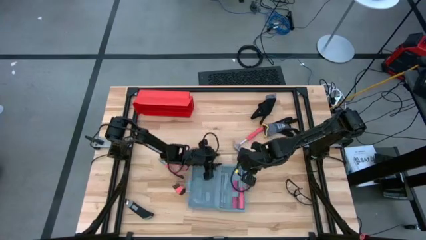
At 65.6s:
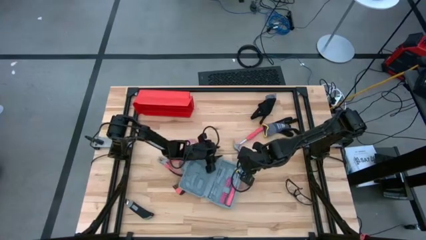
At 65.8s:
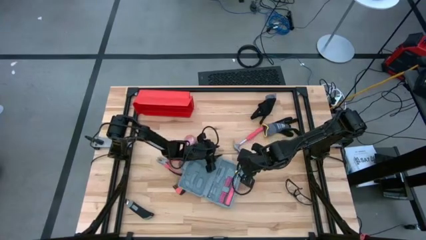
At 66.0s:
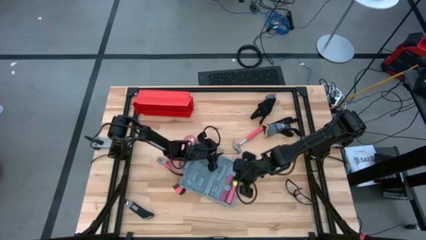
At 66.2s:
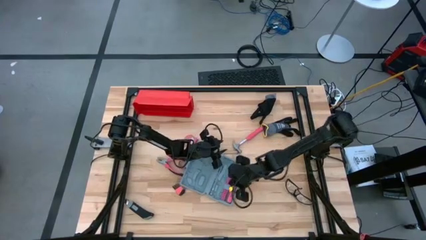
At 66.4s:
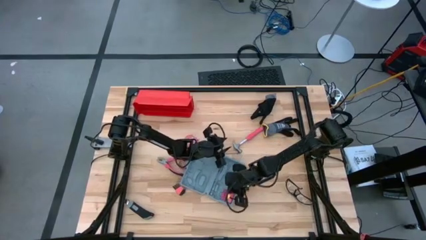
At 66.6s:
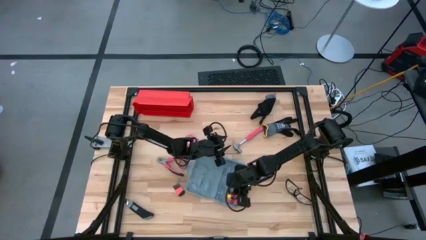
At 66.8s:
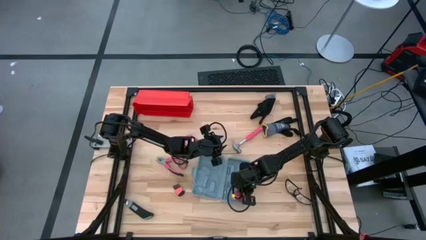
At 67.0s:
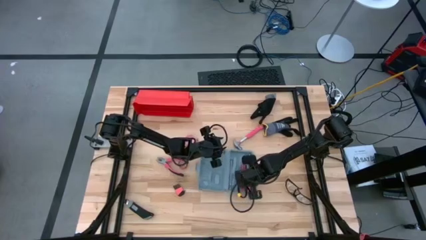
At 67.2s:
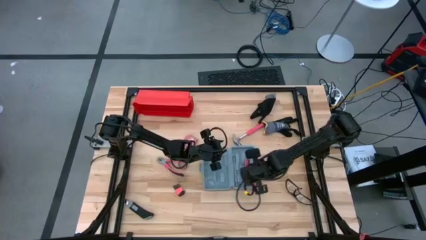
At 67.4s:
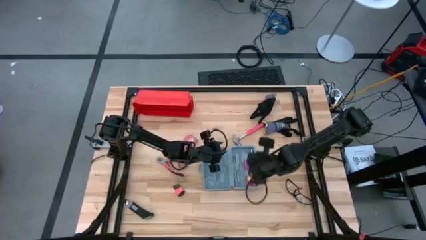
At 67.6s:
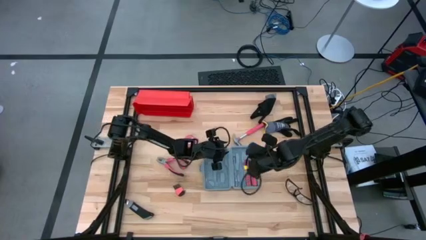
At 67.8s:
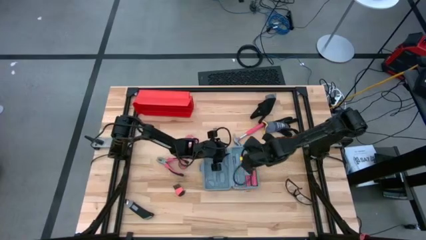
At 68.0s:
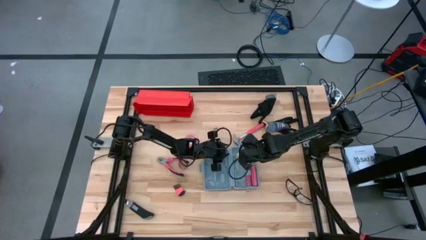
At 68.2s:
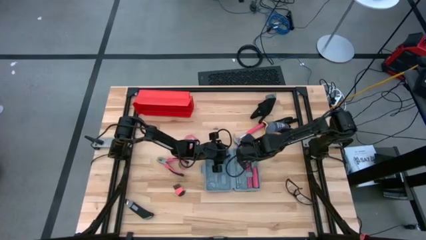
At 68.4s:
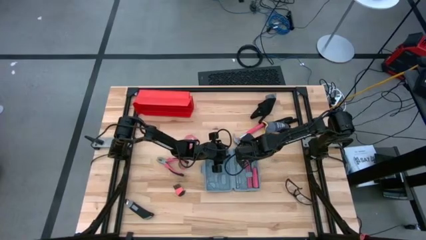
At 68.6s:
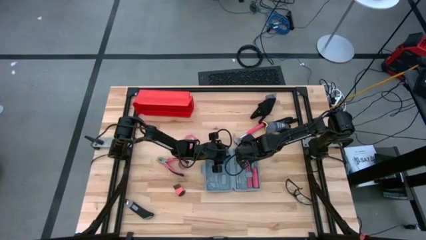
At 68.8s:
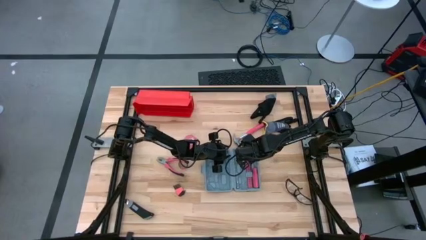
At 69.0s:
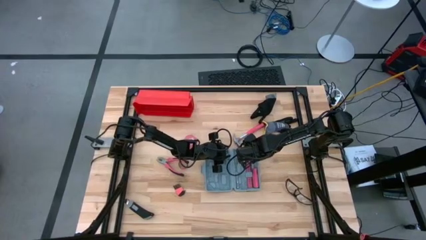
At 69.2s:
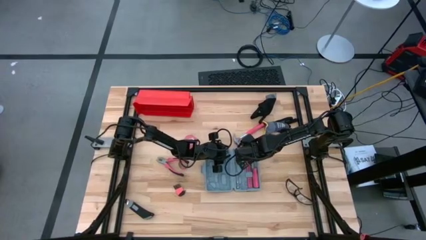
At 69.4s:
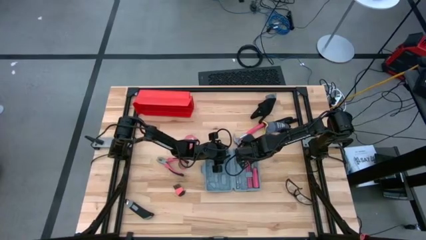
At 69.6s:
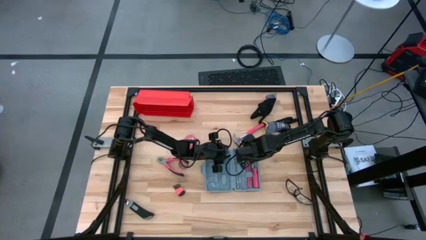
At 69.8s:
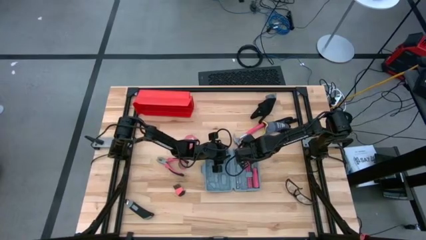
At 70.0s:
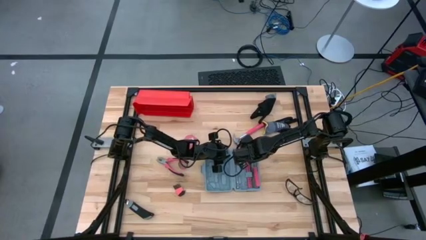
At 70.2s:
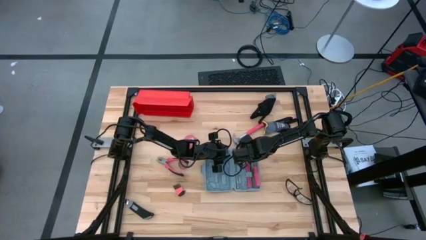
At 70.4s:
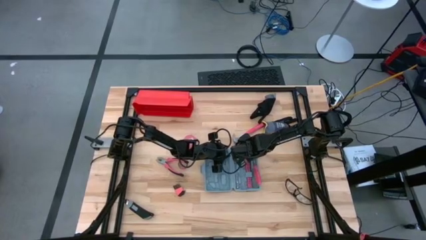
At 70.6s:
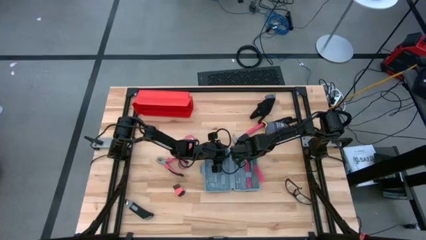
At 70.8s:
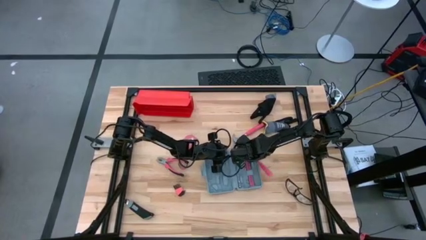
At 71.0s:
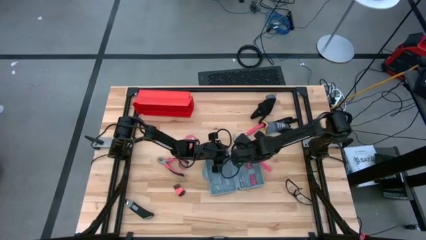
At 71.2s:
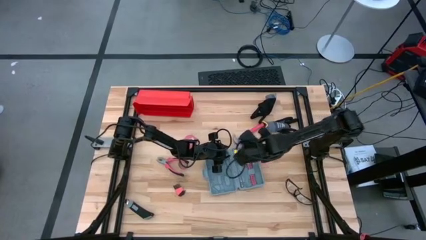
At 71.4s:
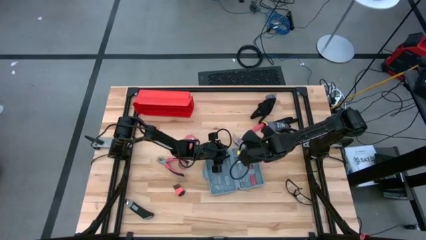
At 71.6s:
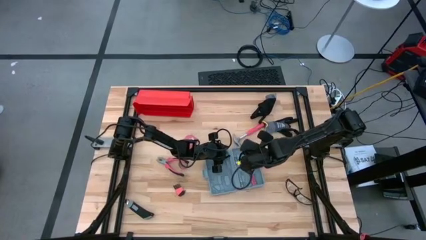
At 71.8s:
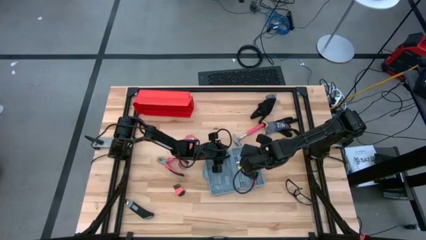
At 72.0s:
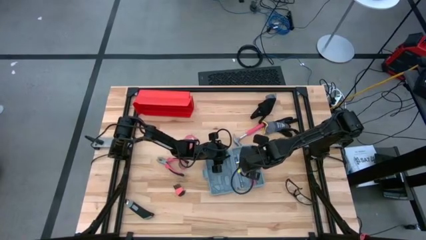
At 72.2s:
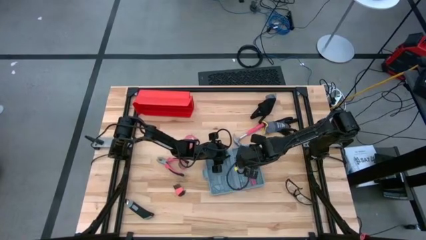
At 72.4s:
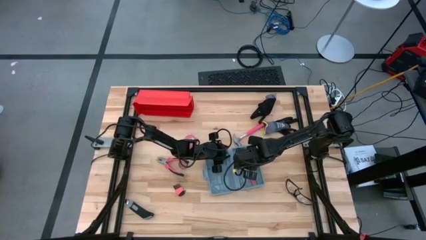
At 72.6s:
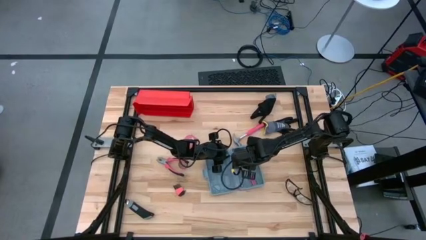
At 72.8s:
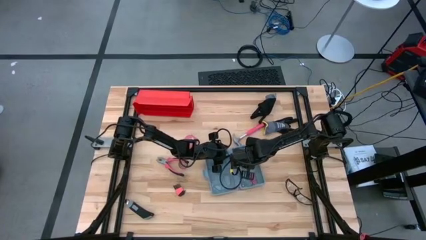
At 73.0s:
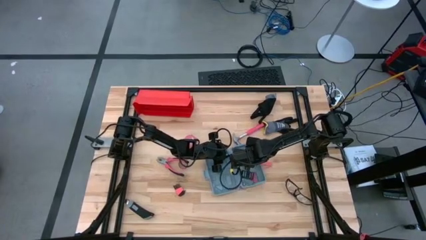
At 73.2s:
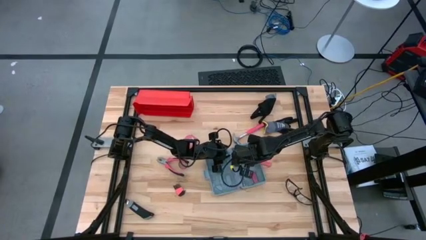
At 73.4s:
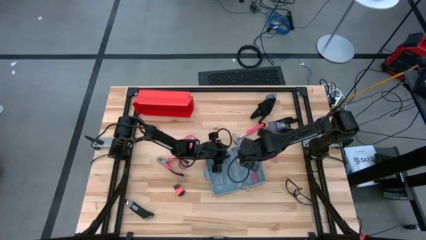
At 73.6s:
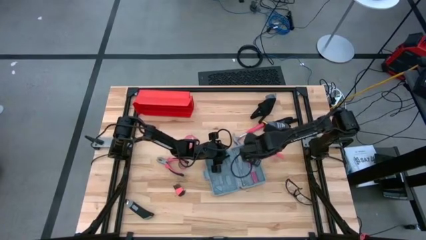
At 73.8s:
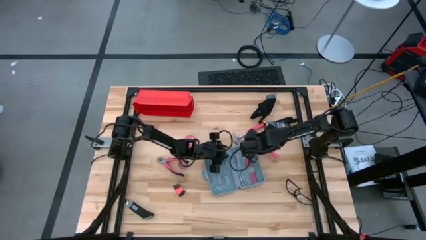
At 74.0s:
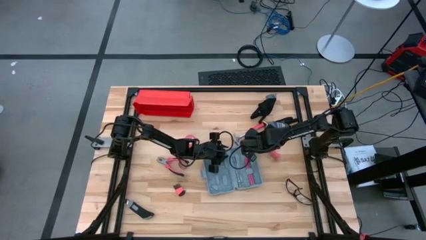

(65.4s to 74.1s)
Task: prefit tool cases
Remove the orange nut driver from the gray pre-fit tool case

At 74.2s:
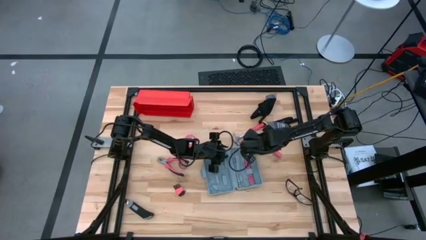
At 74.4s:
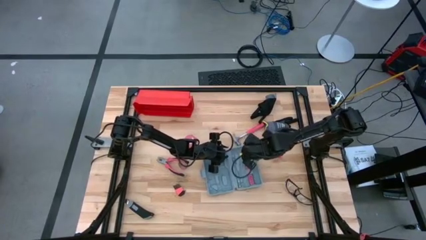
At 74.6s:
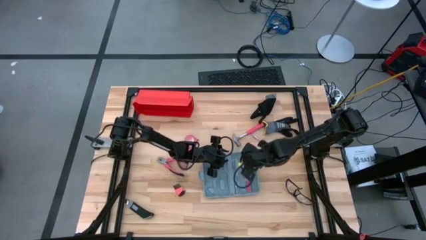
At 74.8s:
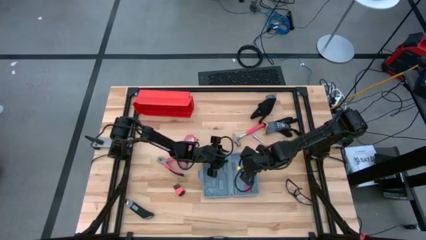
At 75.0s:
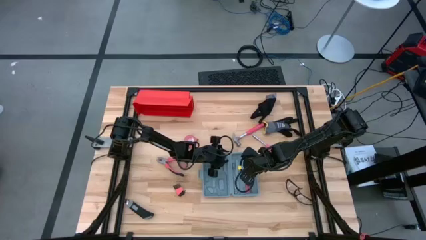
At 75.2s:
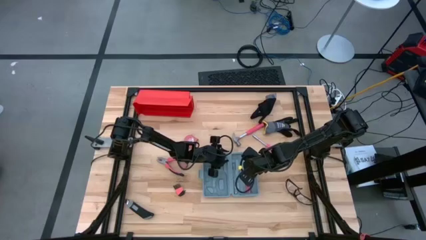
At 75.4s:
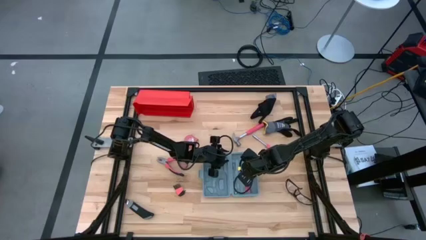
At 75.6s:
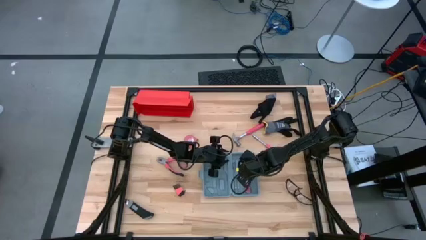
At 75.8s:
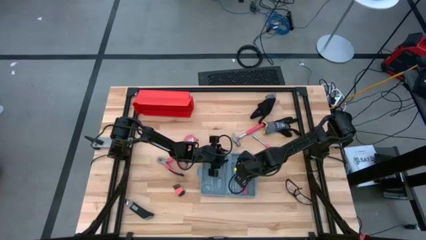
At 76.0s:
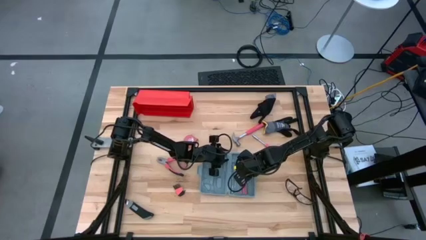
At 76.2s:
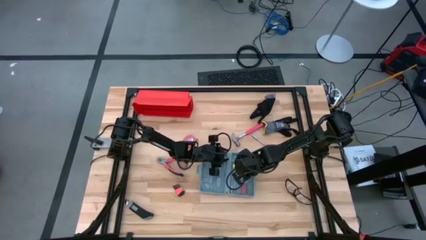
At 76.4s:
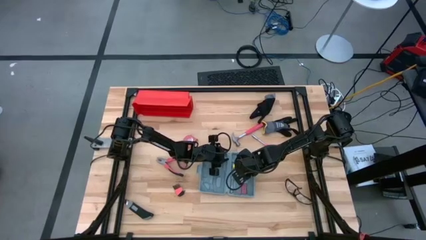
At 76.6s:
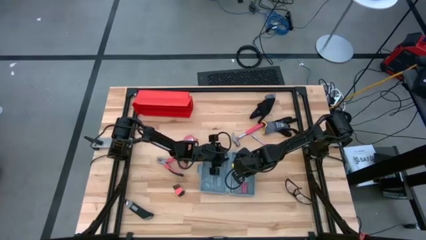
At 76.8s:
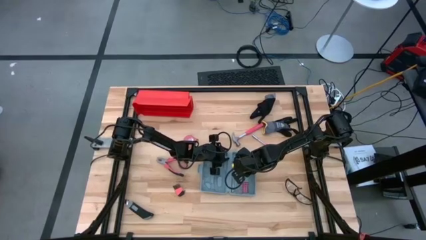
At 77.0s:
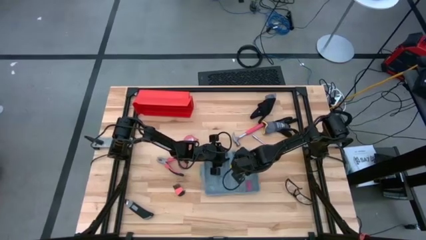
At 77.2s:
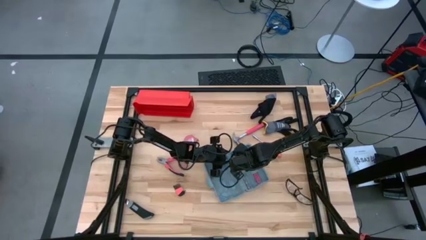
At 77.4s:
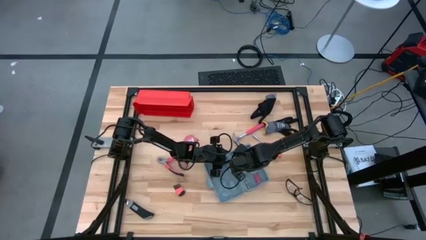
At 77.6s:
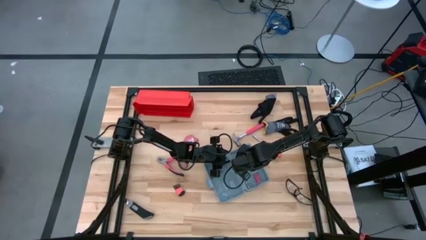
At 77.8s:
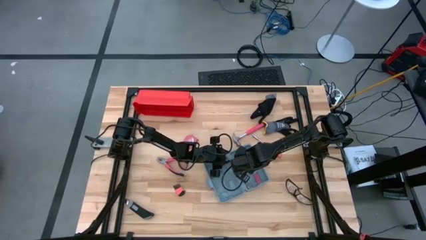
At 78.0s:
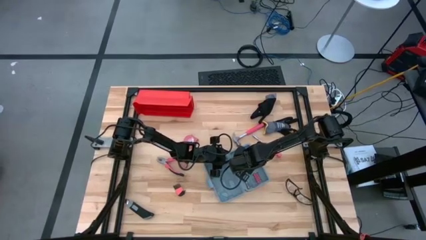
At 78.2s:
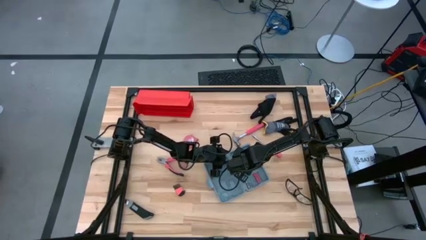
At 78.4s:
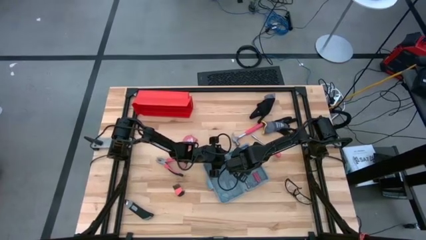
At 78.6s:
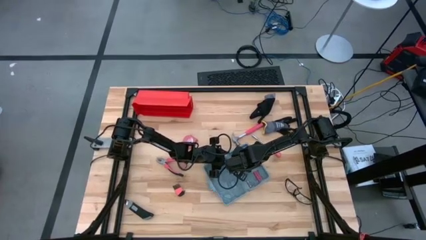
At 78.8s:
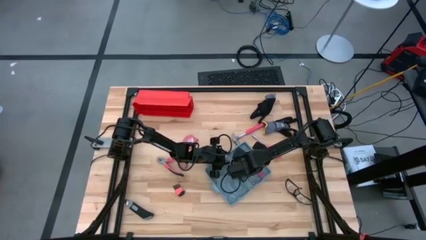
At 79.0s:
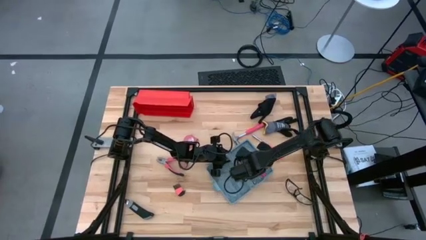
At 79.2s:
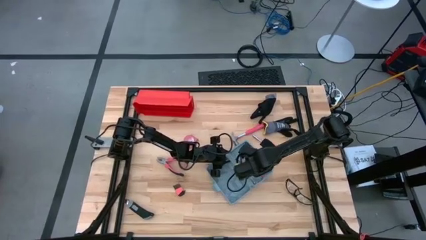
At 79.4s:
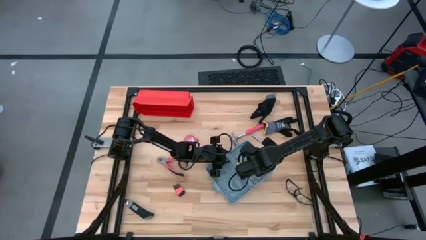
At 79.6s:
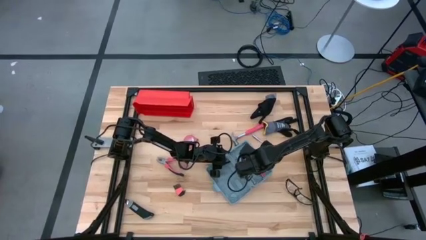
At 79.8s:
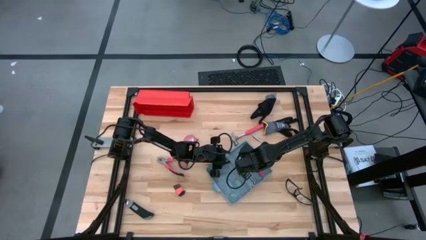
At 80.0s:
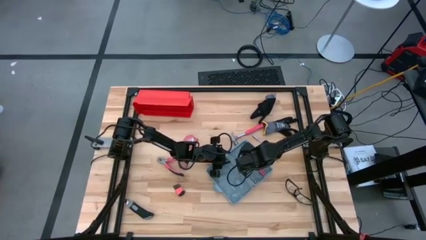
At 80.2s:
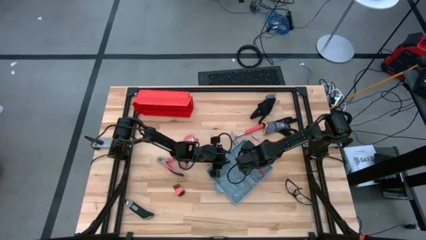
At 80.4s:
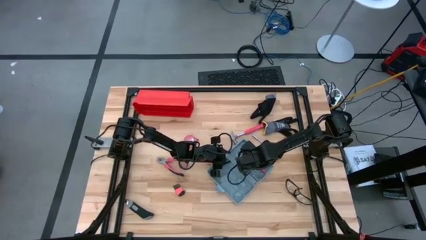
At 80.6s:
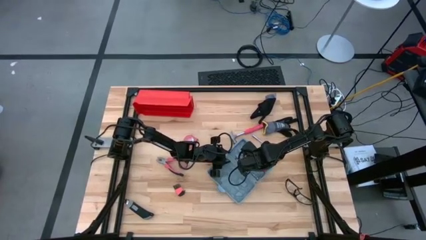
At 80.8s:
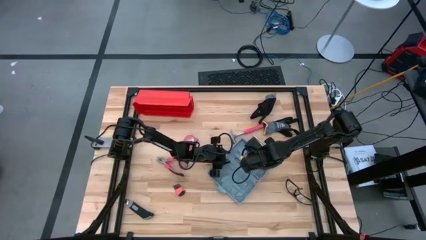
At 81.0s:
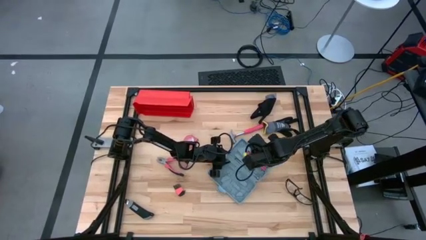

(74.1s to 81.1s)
Remove the top orange screwdriver bit set from the gray pre-fit tool case

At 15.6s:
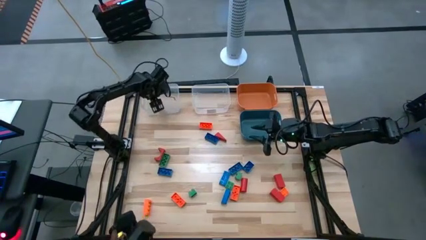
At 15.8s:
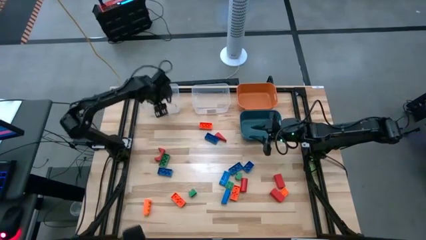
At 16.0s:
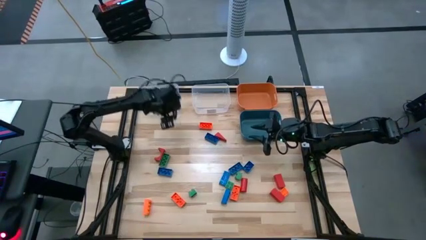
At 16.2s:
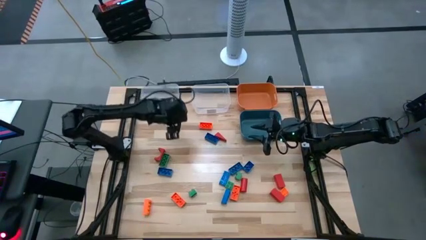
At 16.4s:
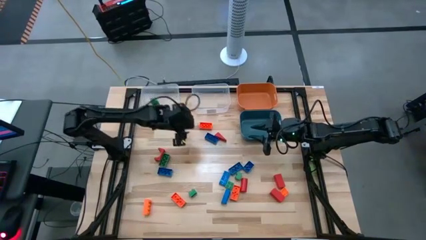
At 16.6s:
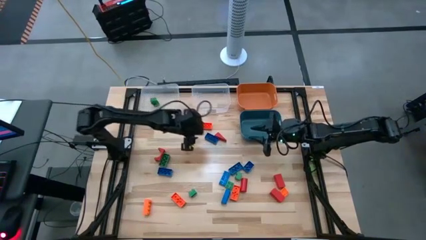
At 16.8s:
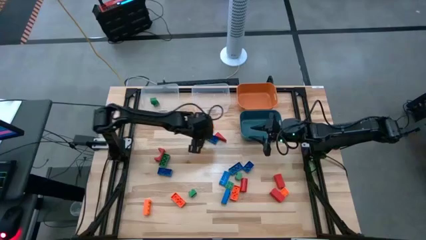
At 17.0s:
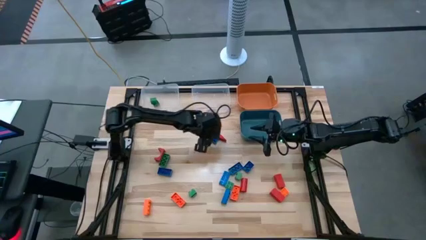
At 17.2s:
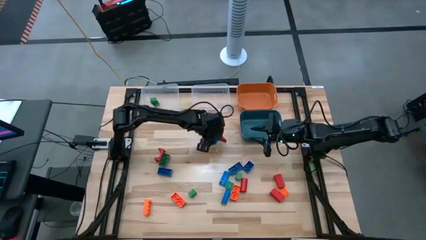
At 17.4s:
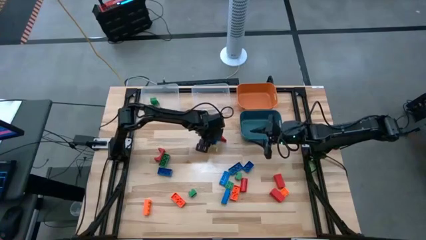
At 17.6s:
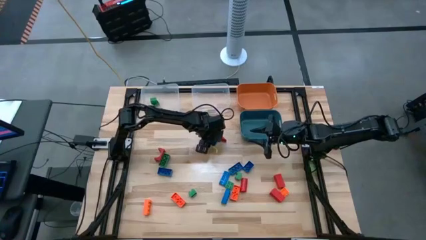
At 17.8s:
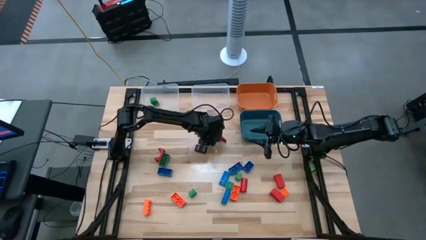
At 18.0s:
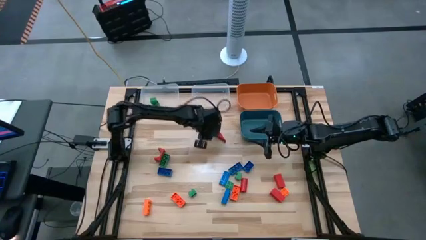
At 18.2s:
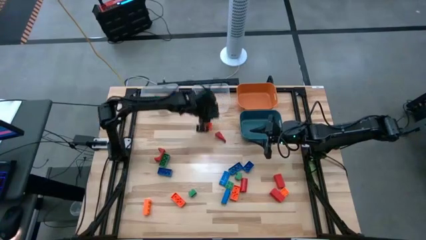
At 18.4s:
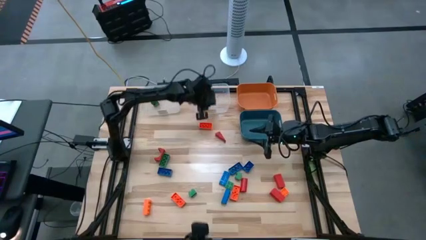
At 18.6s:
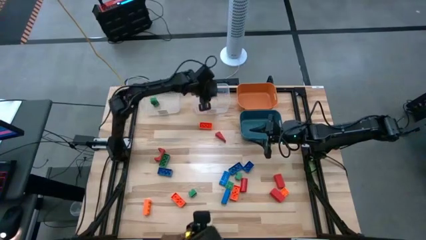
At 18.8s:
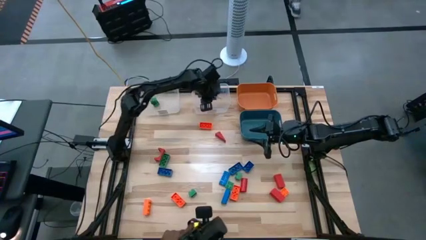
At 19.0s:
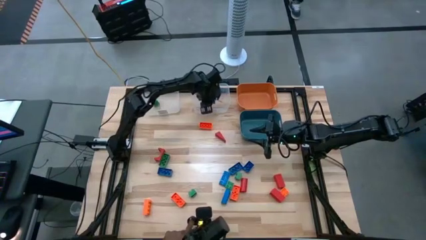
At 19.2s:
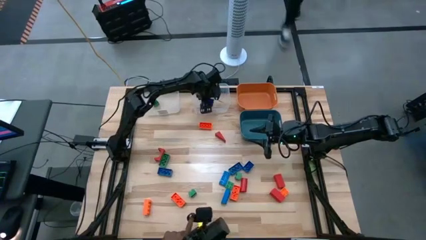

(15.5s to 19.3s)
Task: Sort blocks
Put the blue game piece into the right transparent bin
